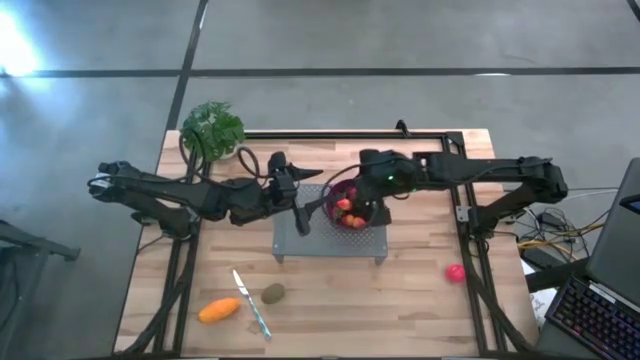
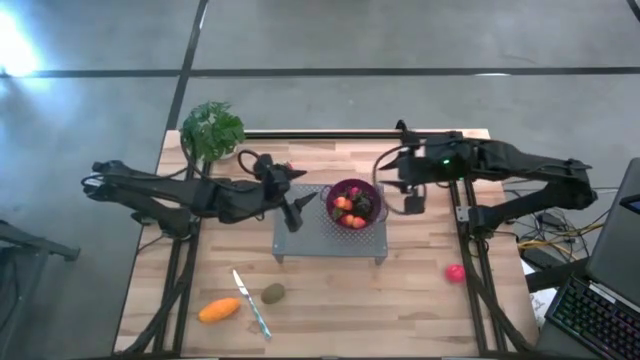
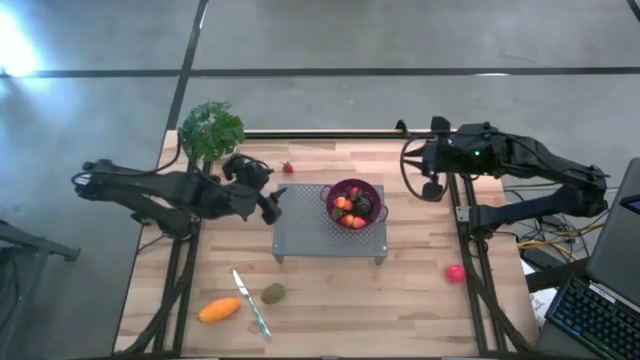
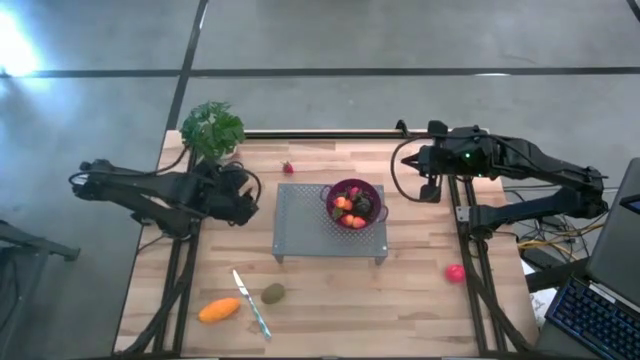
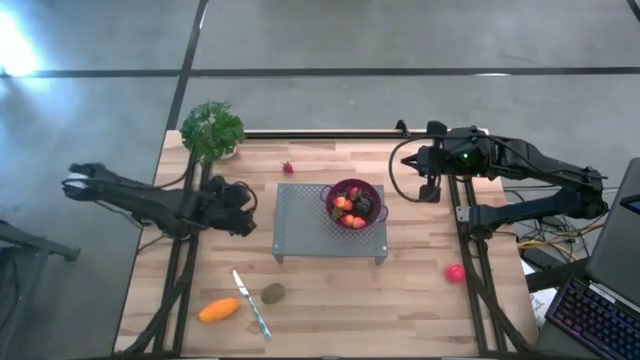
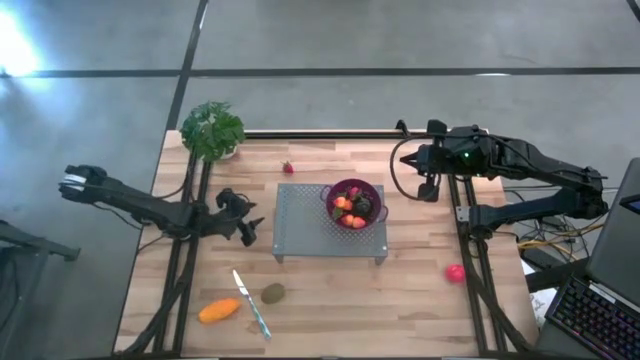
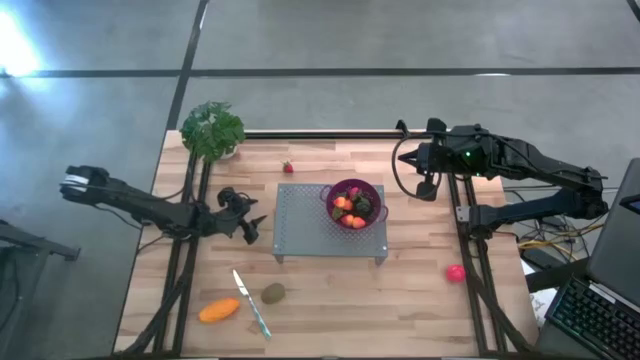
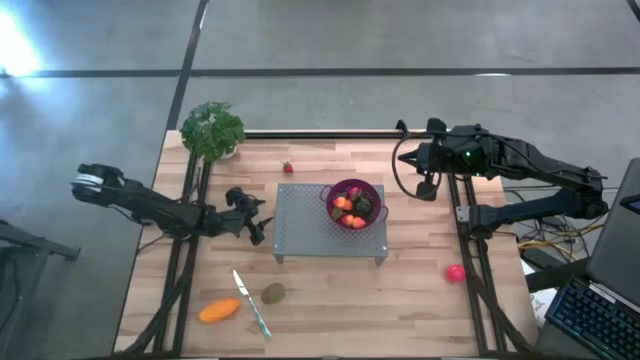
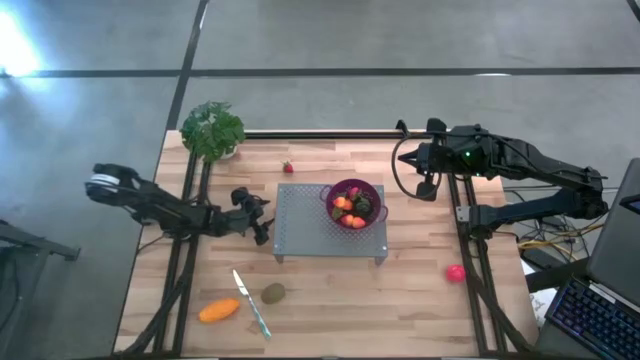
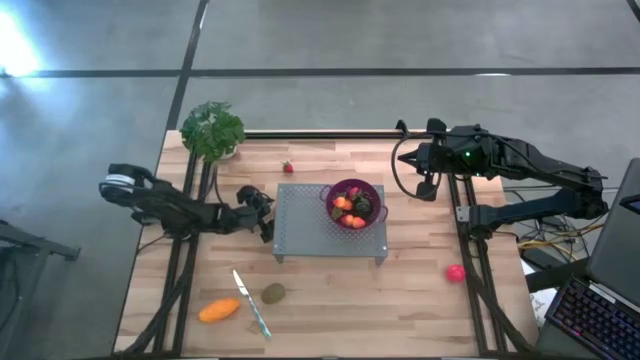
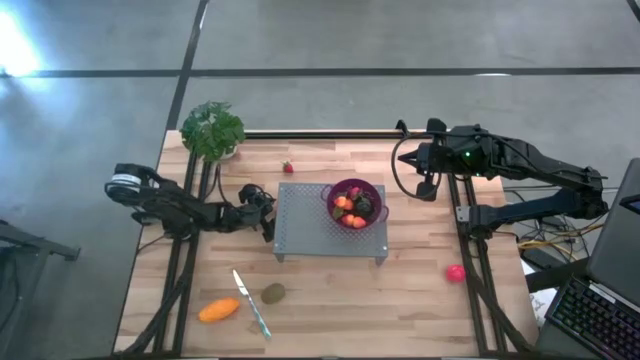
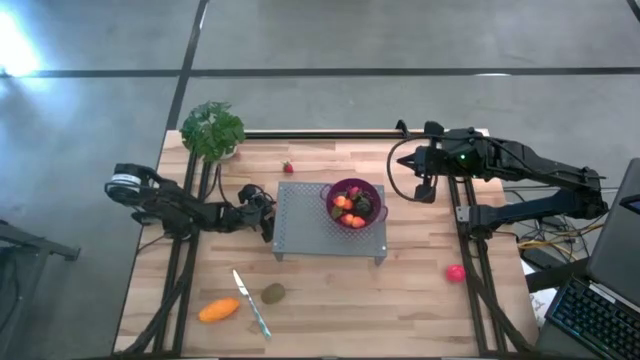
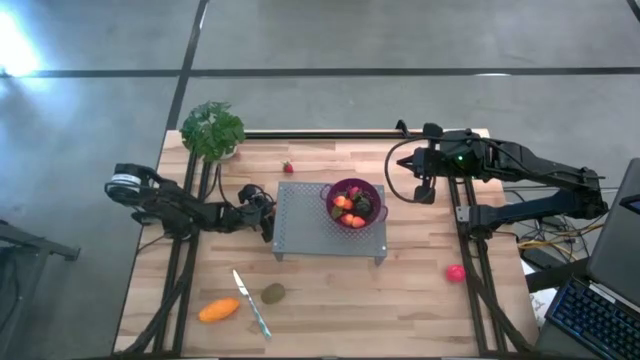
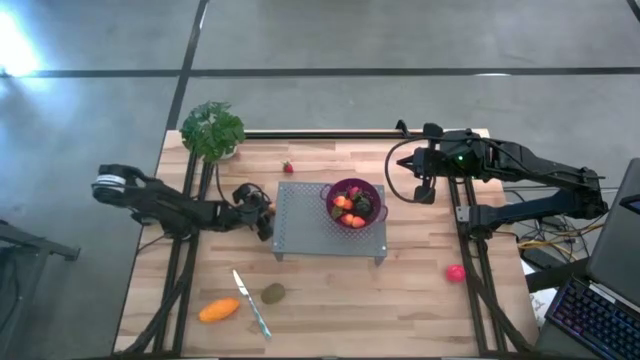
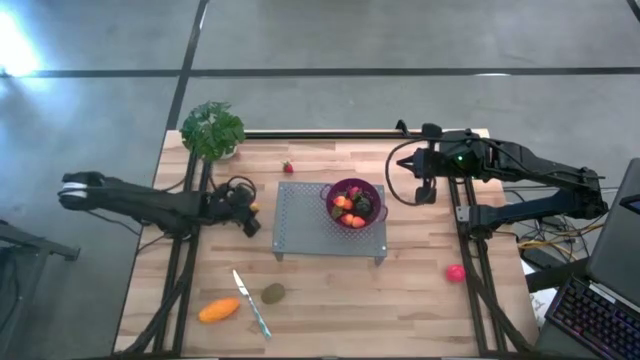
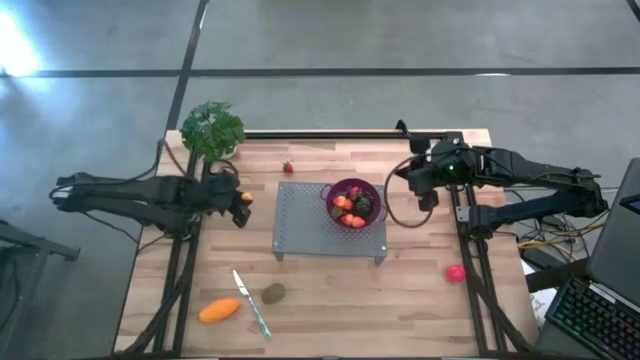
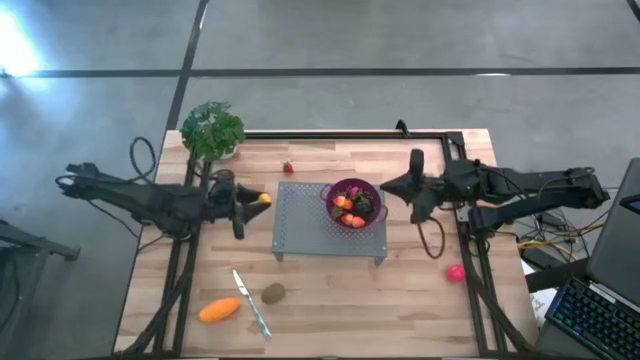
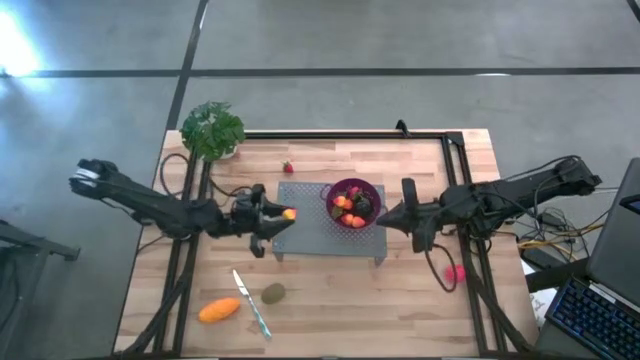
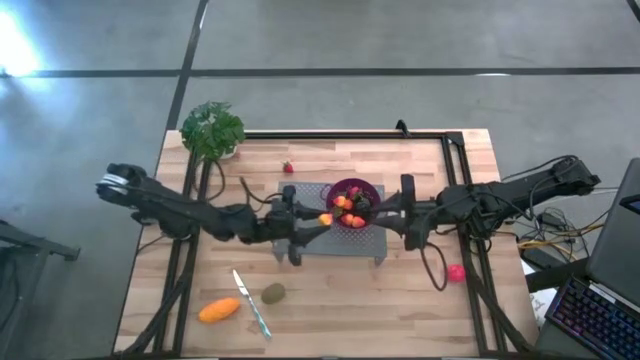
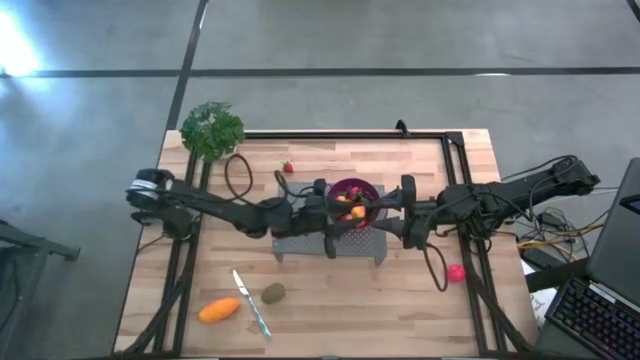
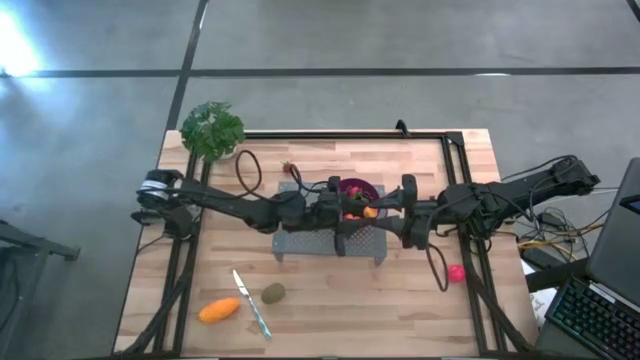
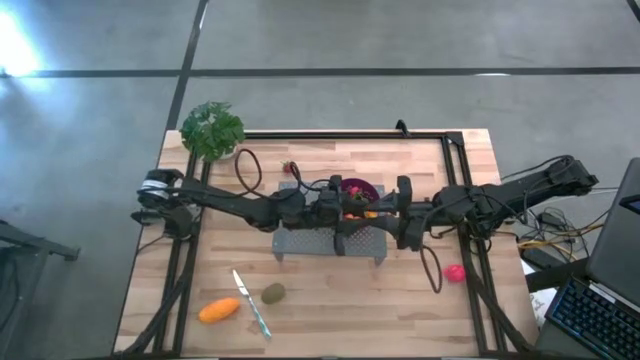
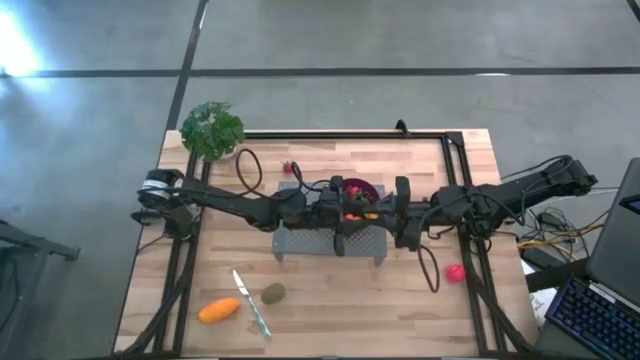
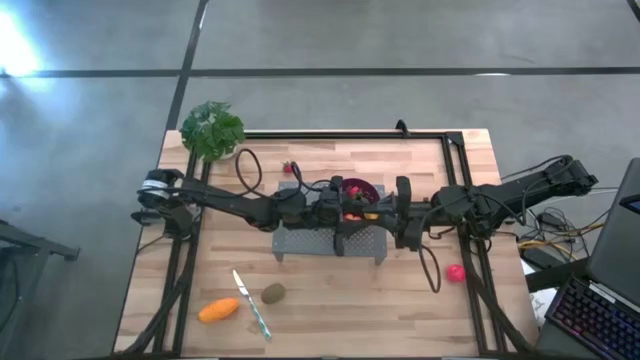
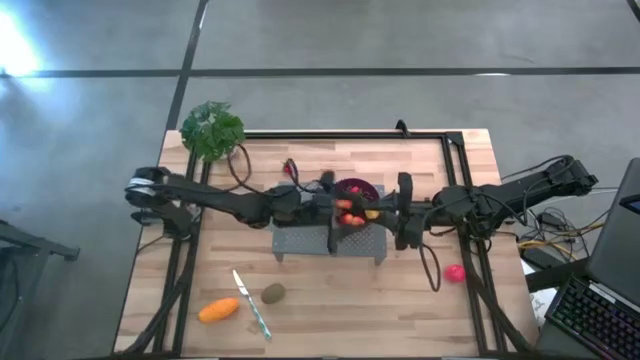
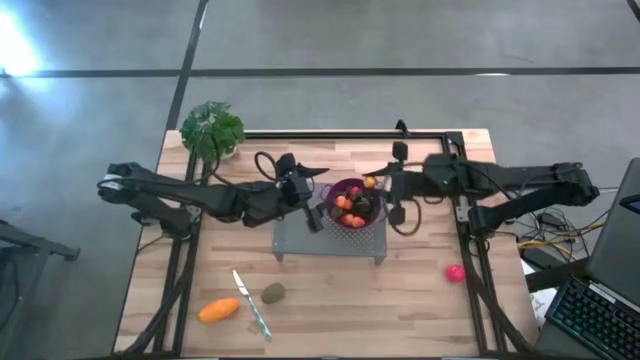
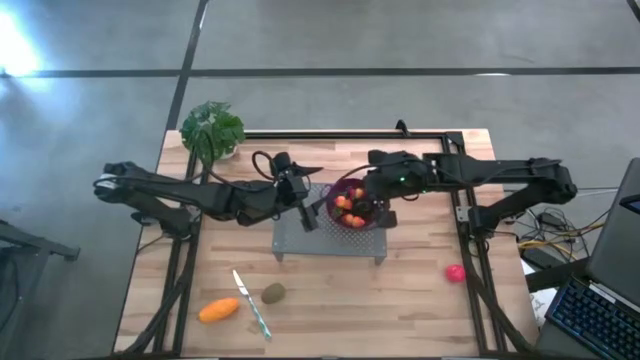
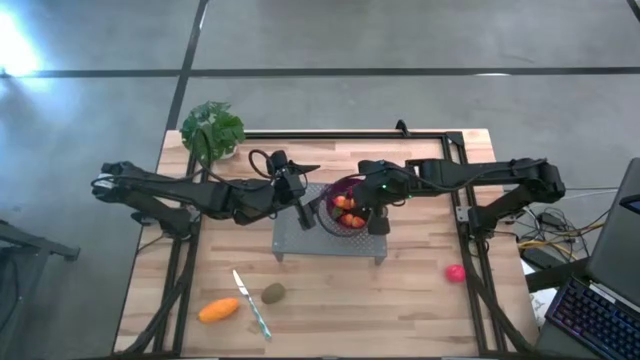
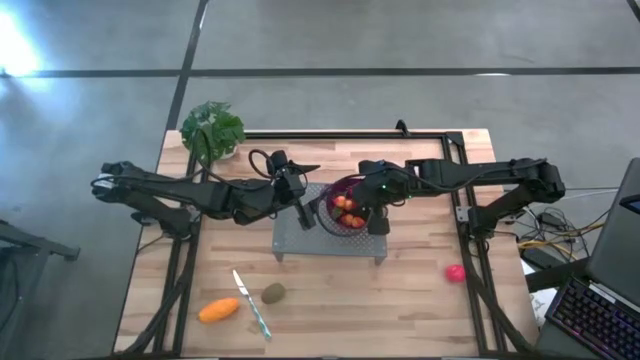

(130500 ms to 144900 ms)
Task: Pick & Place Fruit
Put the pear in the purple strainer bowl on the shelf

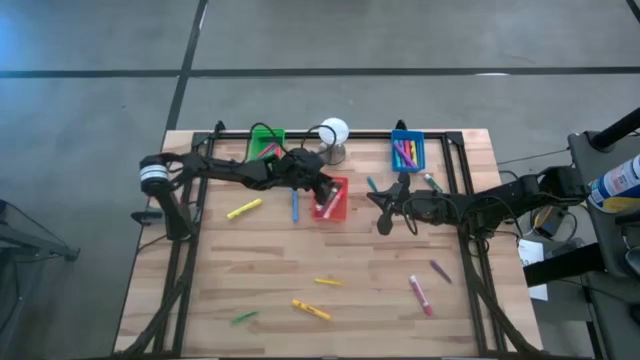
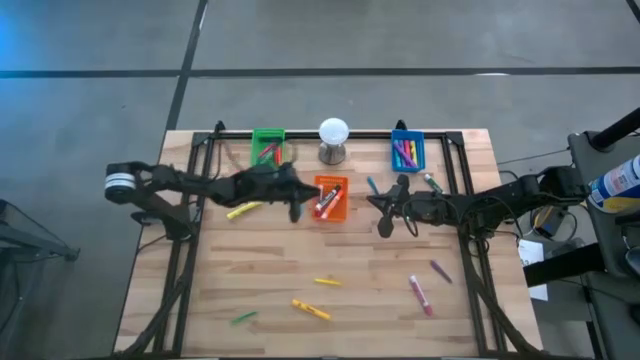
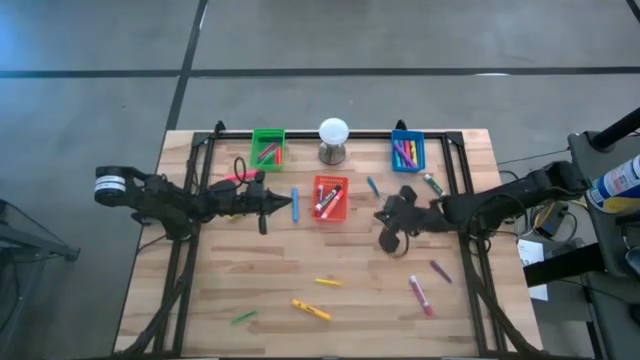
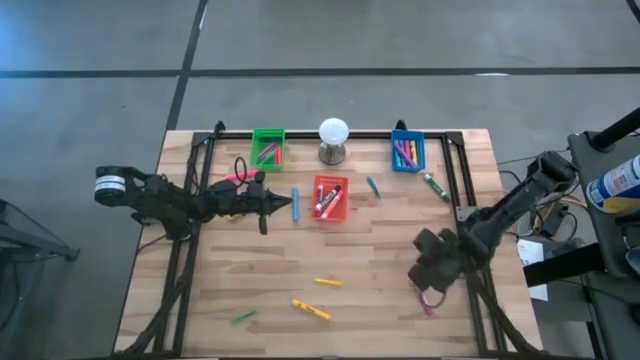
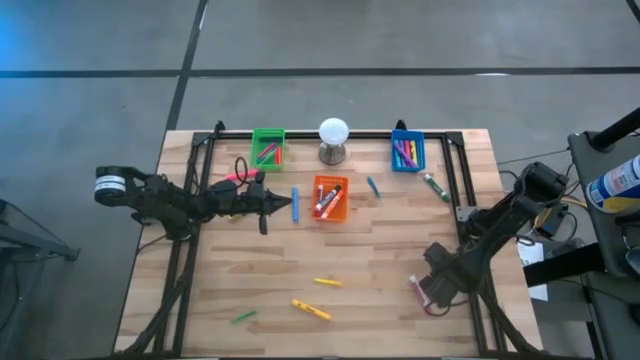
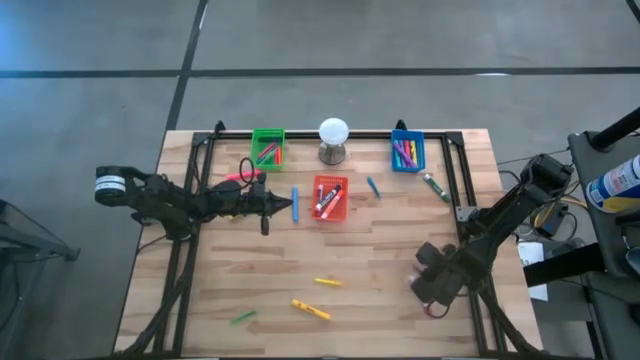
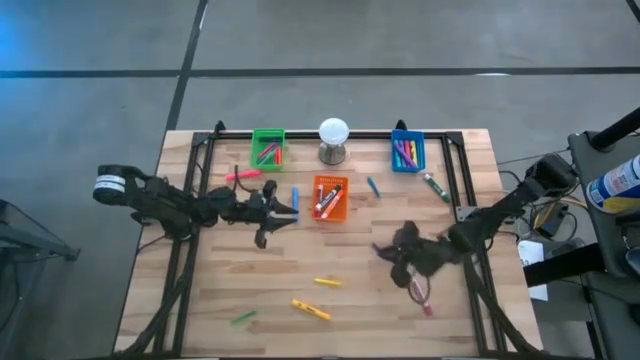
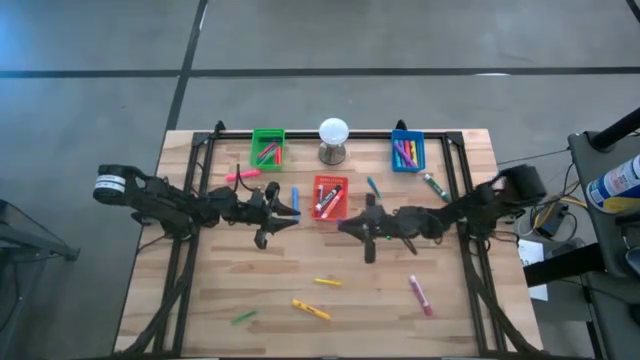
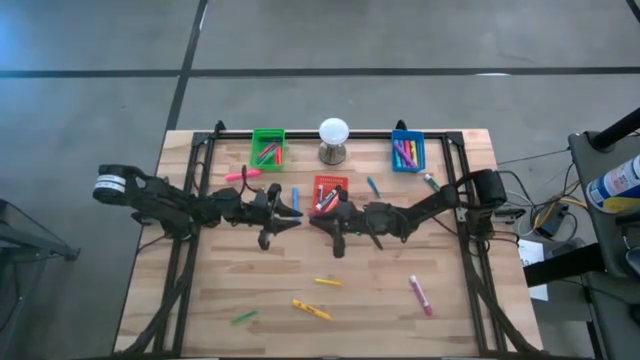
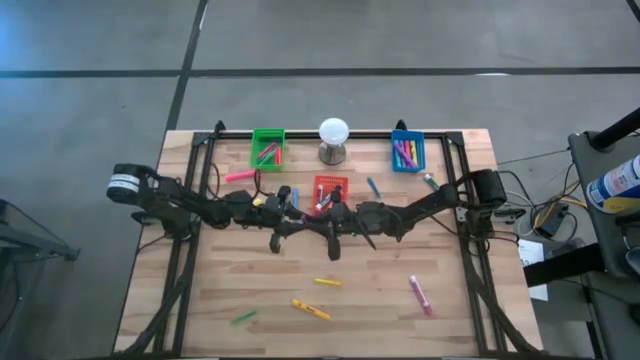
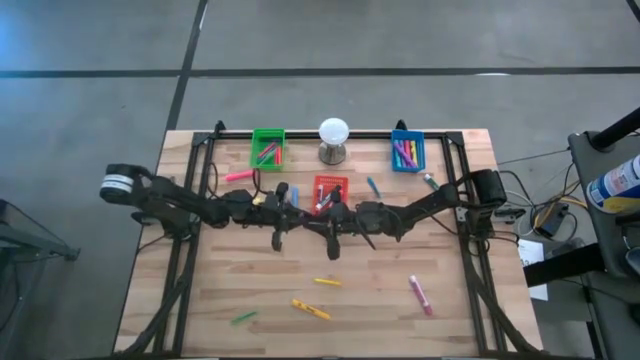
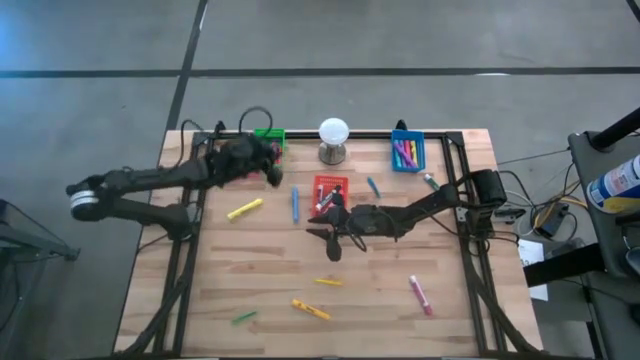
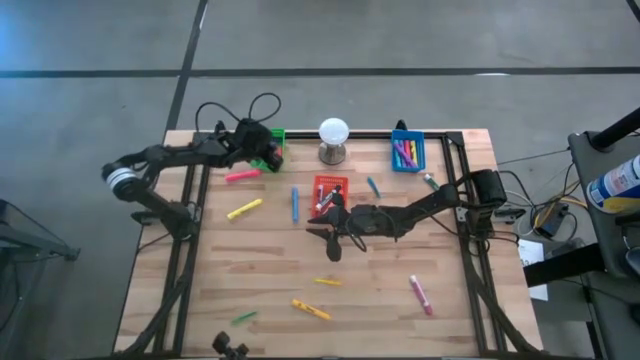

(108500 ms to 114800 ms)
Task: Pick & Place Markers
Put the purple pen into the green bin
